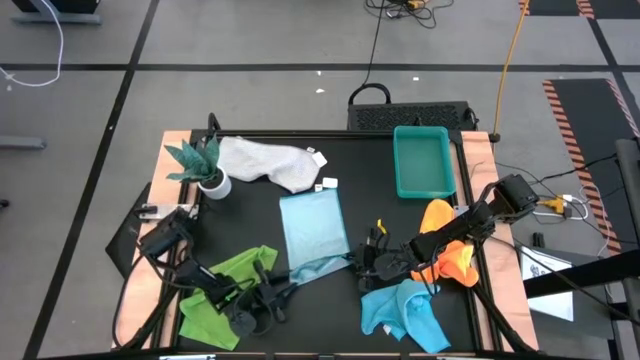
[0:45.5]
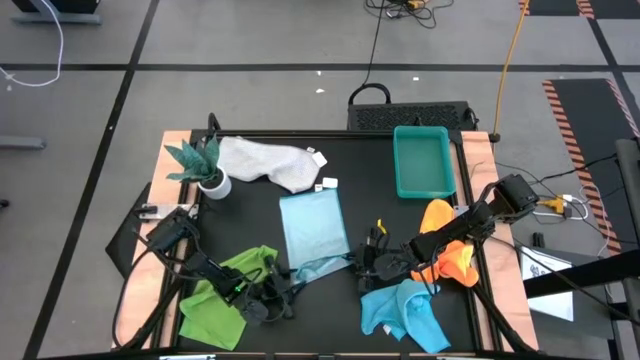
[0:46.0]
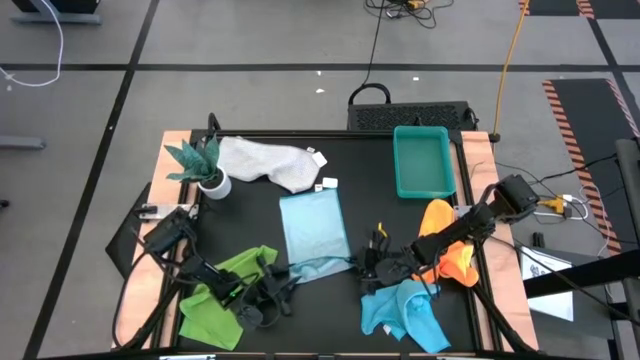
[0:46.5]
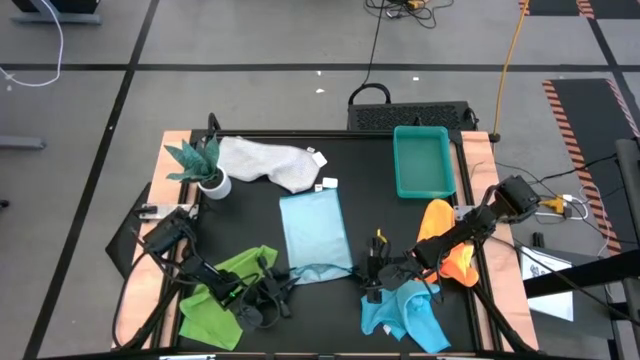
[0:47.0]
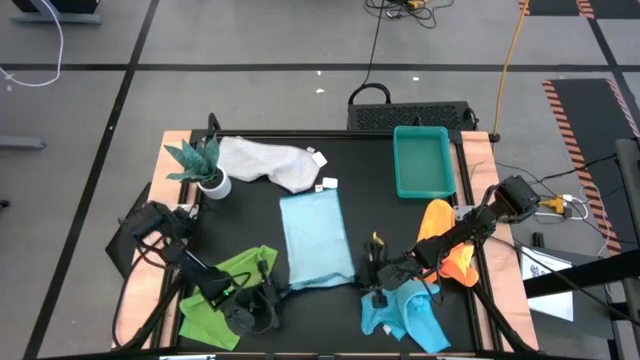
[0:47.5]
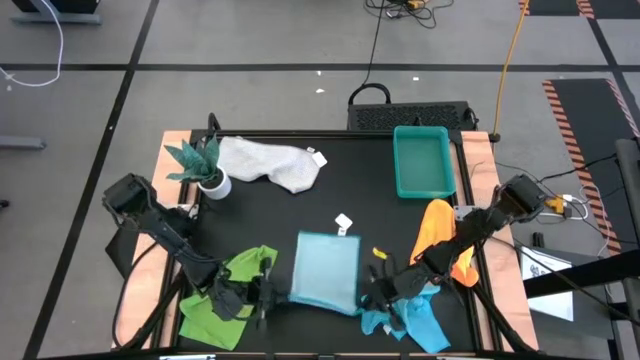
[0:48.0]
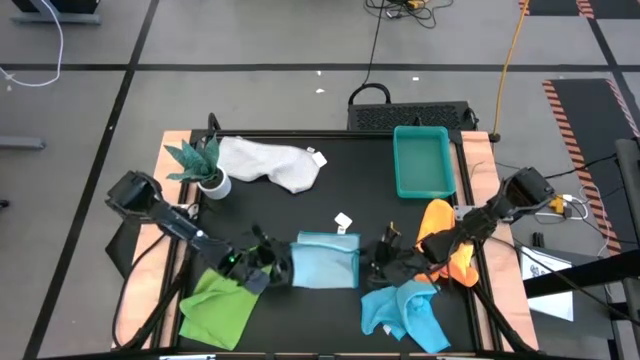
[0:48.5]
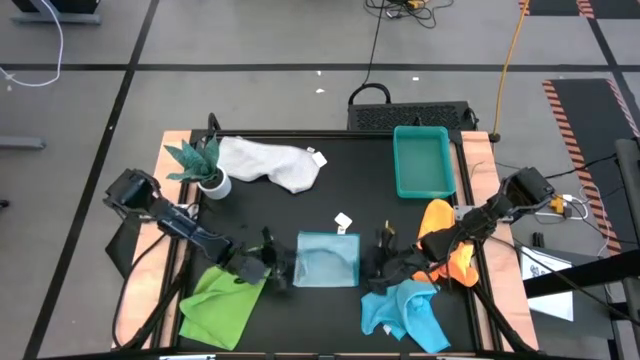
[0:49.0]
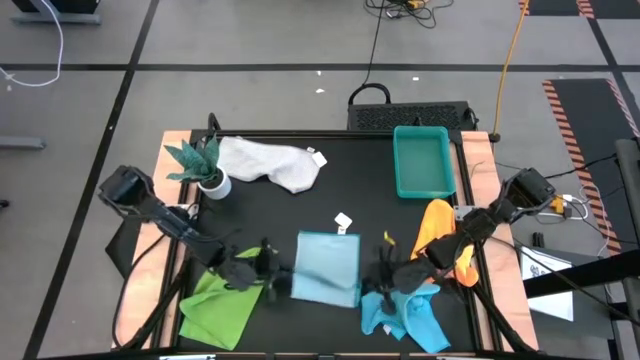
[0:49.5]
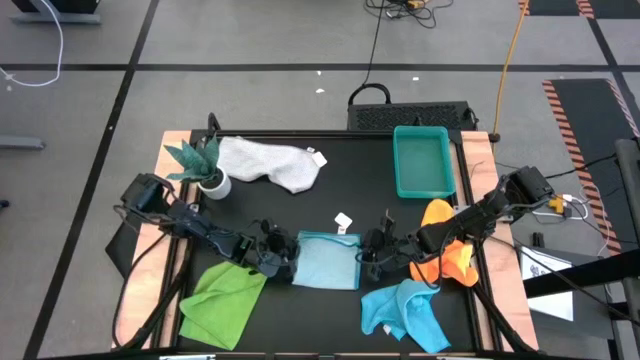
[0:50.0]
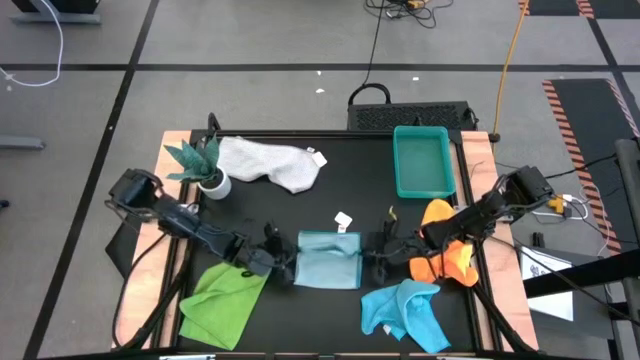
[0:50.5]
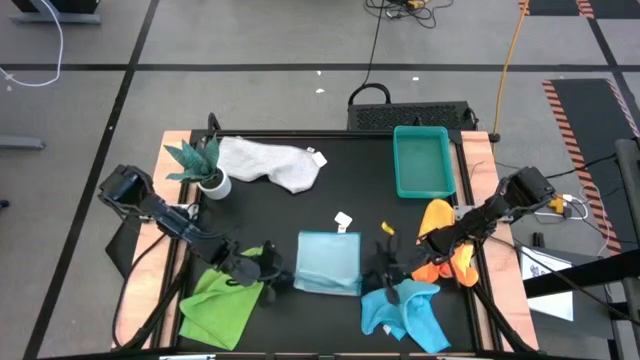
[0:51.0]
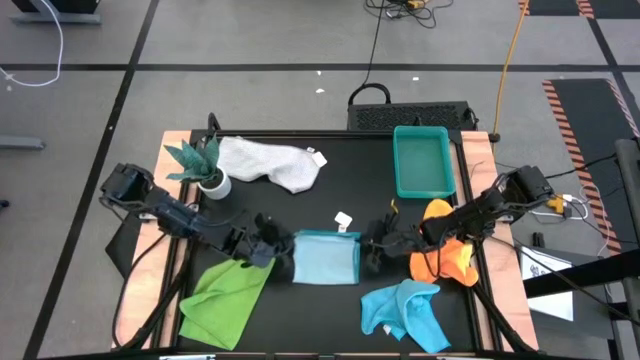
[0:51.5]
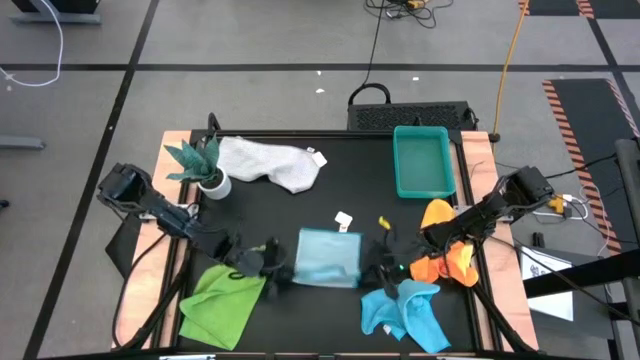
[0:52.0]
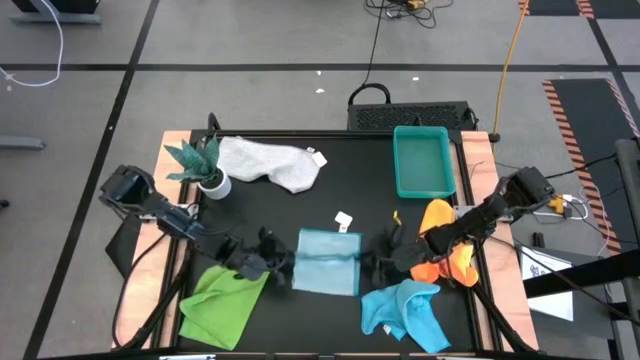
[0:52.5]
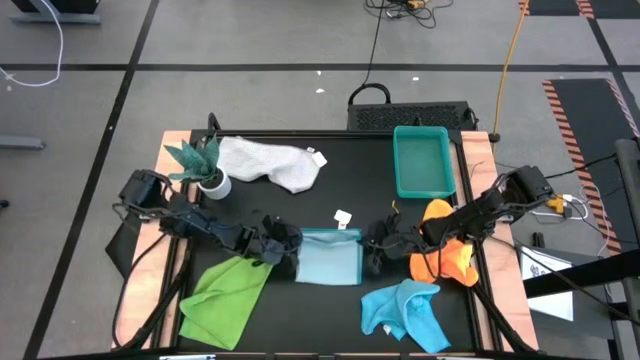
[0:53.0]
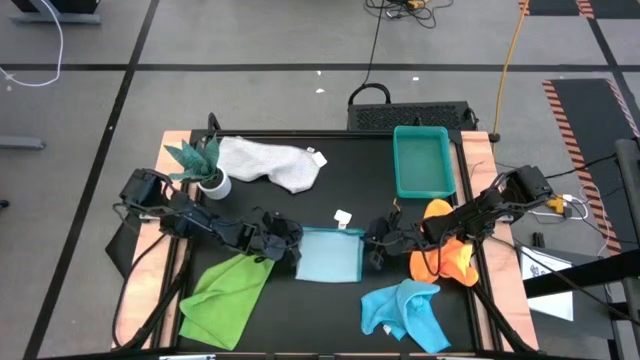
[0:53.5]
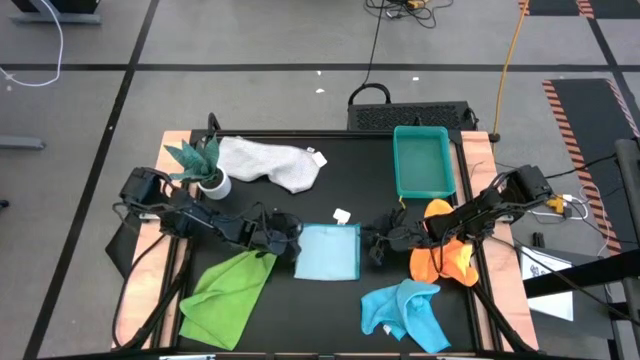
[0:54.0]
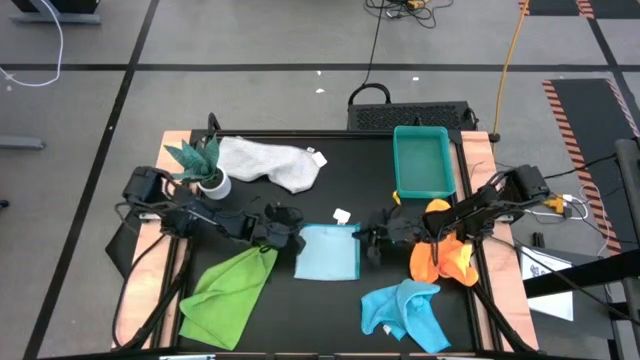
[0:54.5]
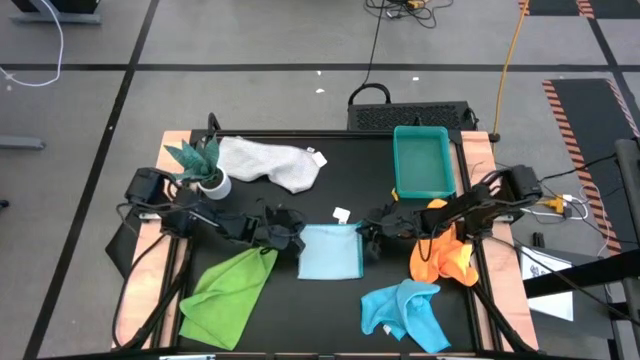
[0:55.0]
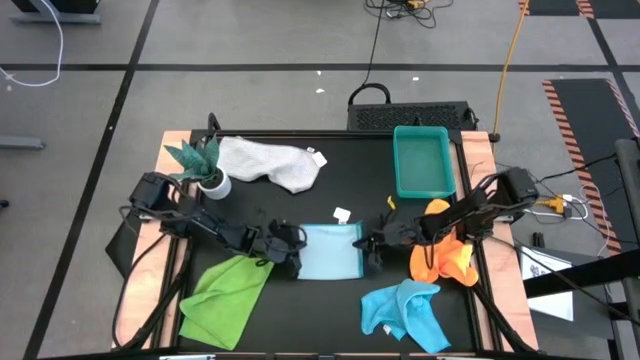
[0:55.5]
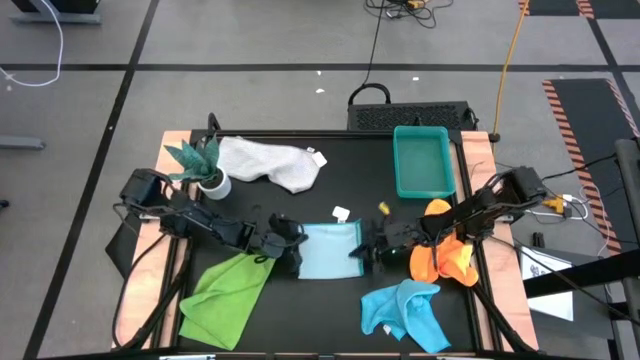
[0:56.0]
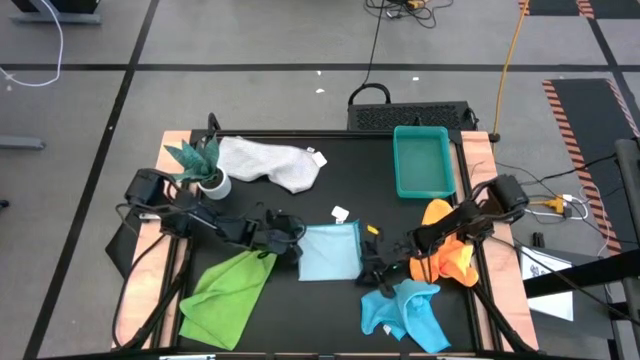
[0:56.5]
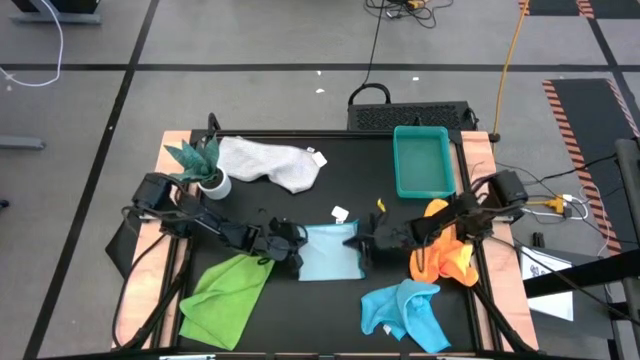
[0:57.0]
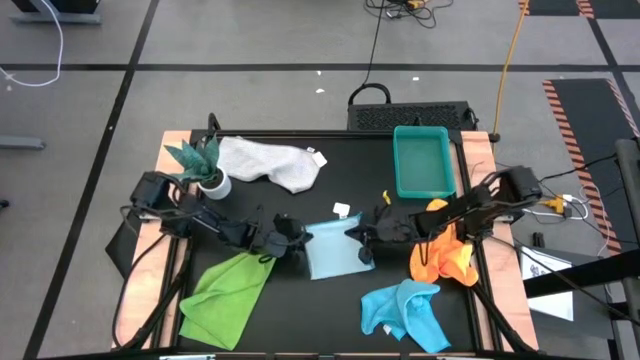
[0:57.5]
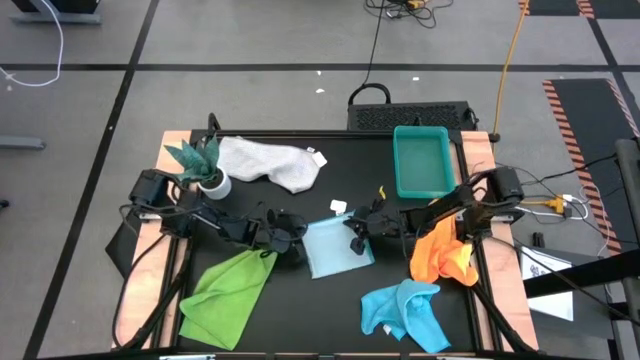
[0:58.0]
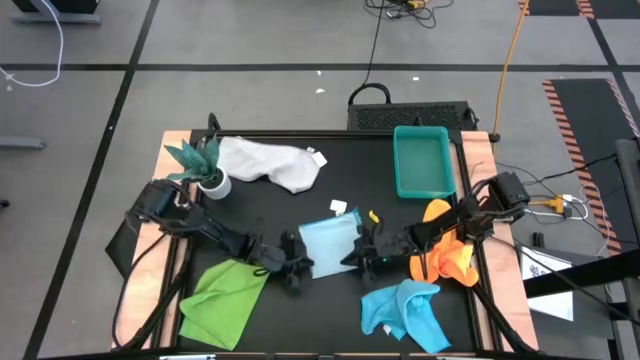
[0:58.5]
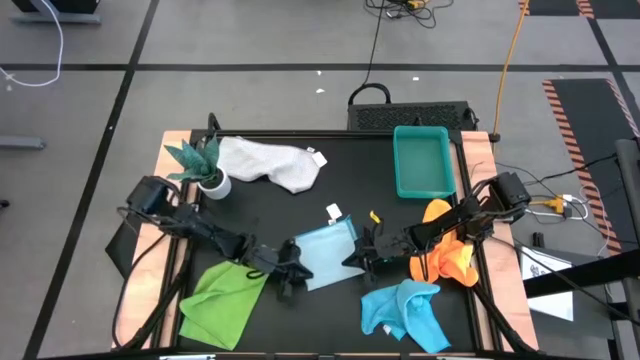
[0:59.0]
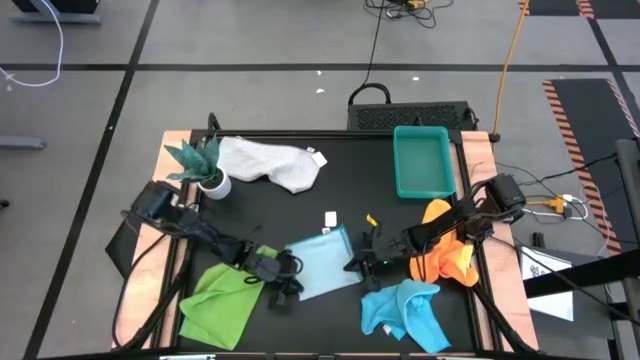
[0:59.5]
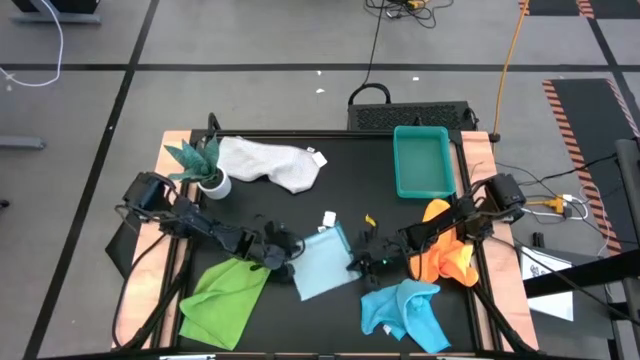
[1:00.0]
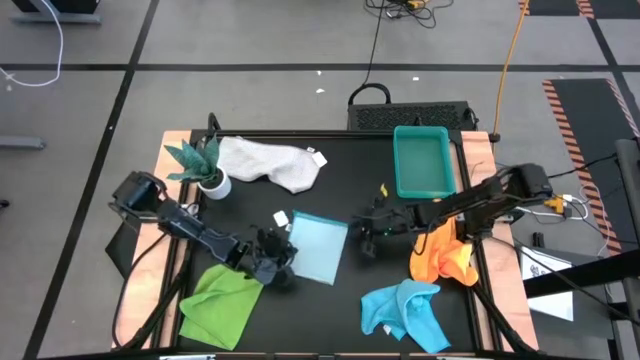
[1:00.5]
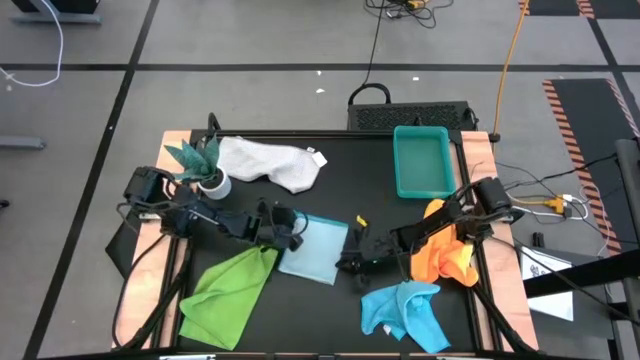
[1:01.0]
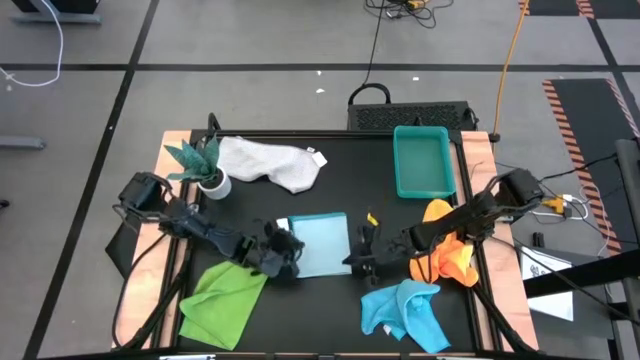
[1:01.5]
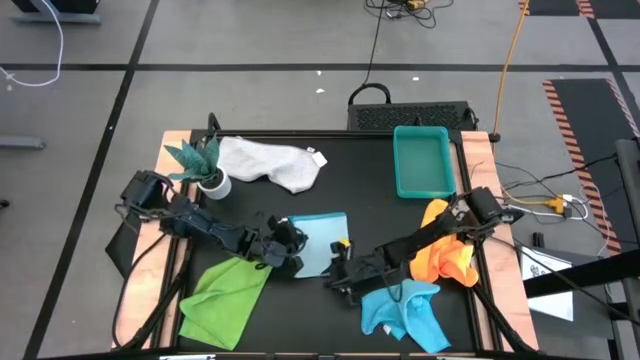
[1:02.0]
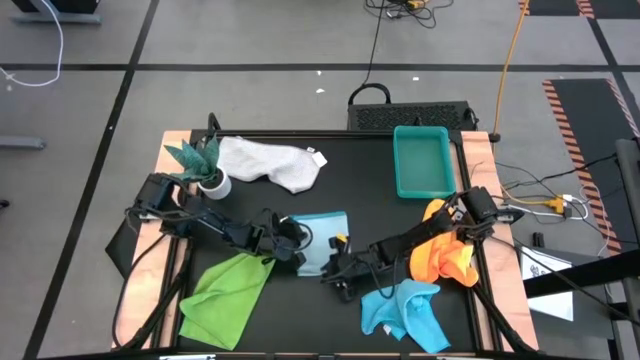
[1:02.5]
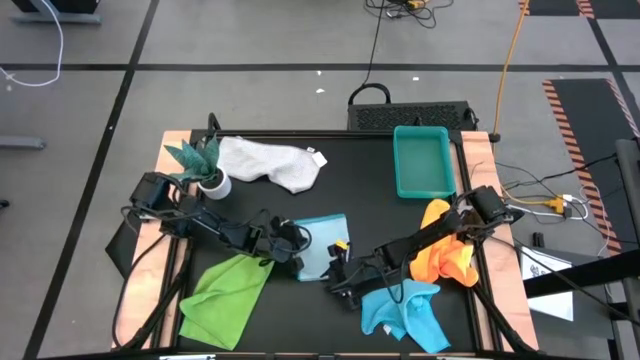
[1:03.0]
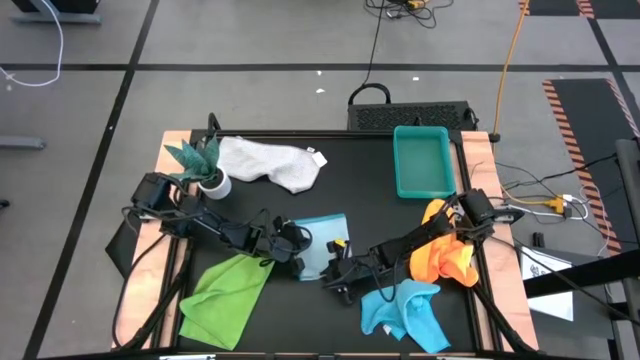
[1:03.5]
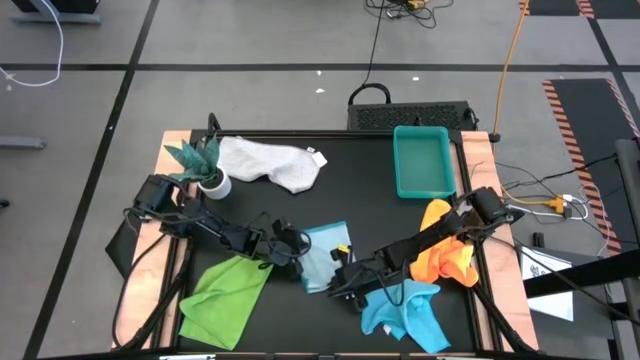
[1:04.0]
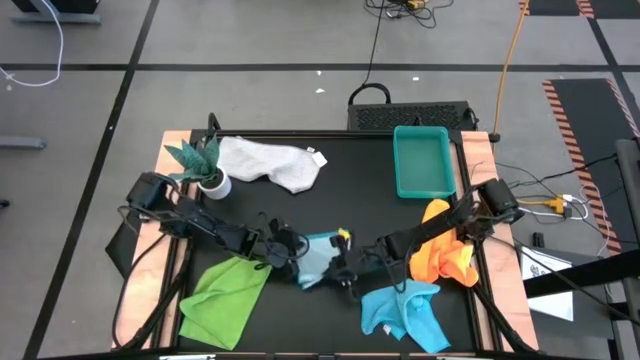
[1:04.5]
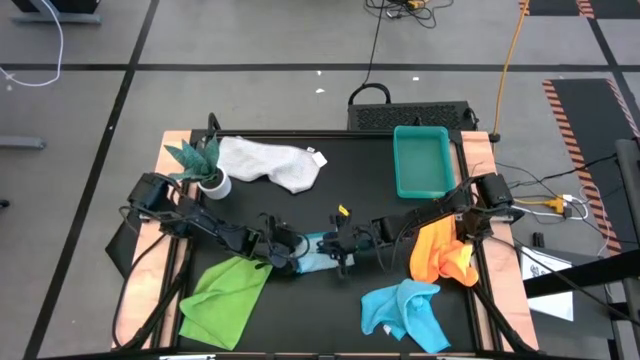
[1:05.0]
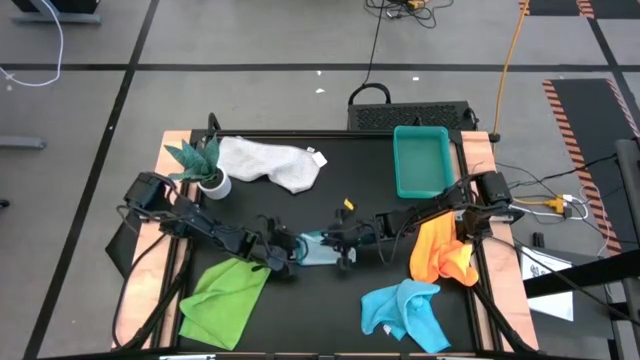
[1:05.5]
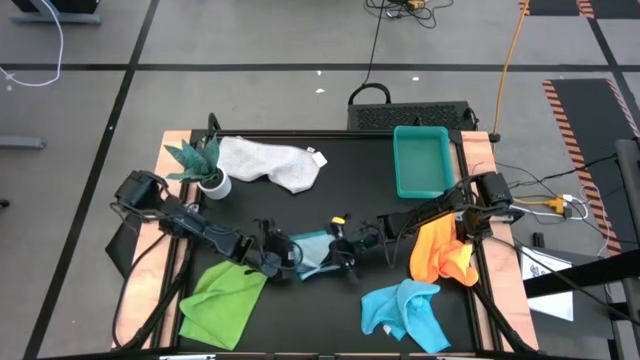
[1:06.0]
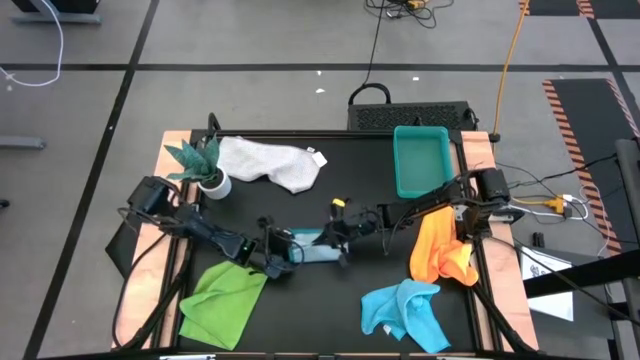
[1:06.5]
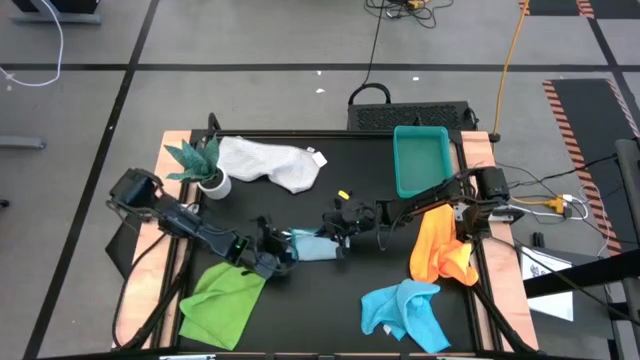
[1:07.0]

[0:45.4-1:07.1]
Task: Fold microfiber towels
Fold the light blue microfiber cloth
